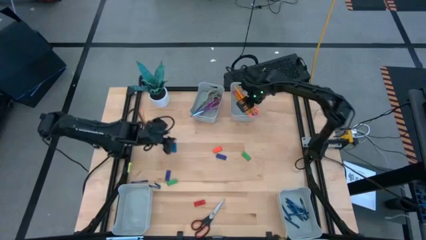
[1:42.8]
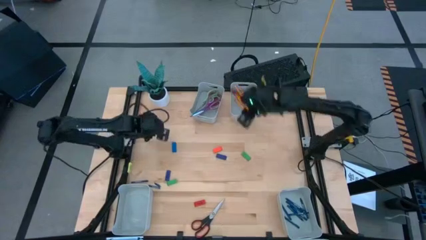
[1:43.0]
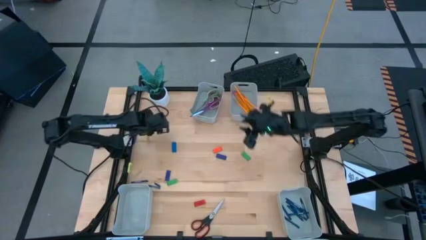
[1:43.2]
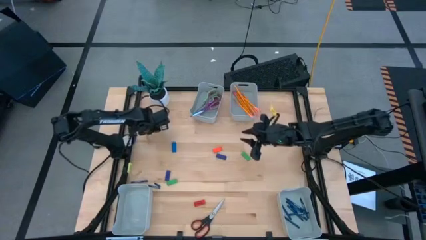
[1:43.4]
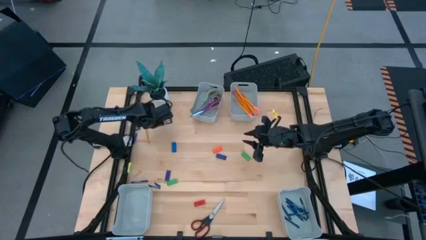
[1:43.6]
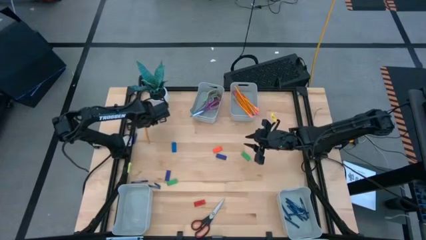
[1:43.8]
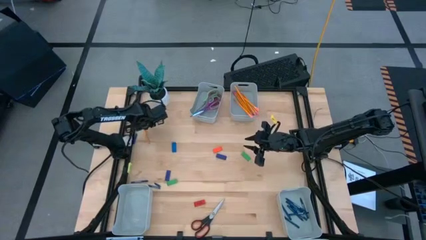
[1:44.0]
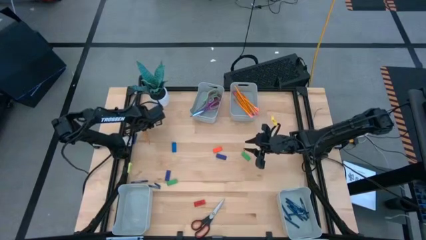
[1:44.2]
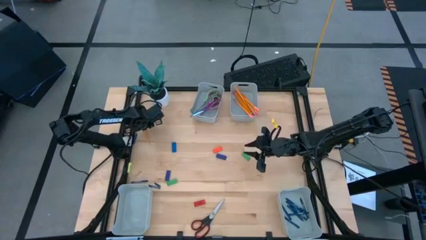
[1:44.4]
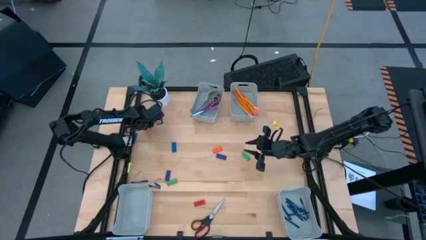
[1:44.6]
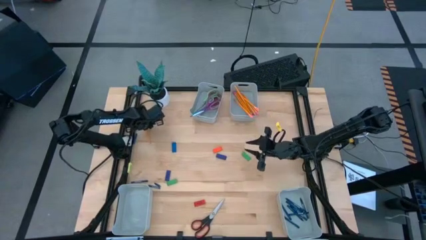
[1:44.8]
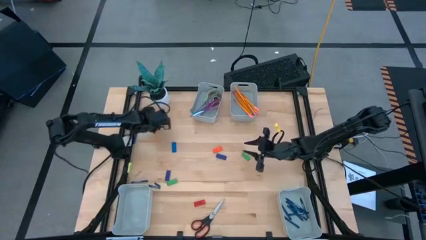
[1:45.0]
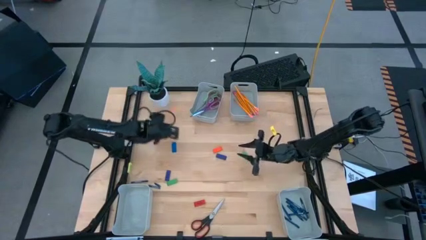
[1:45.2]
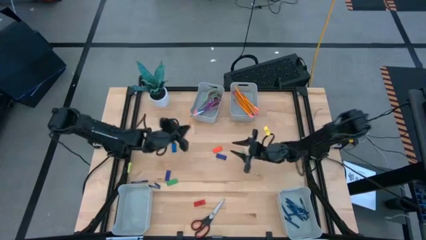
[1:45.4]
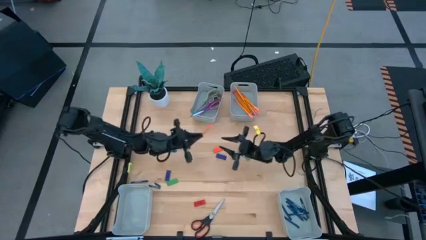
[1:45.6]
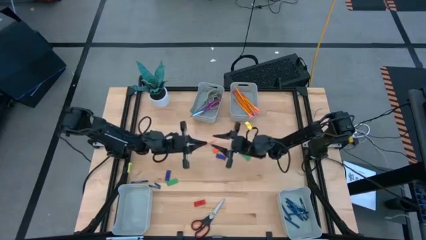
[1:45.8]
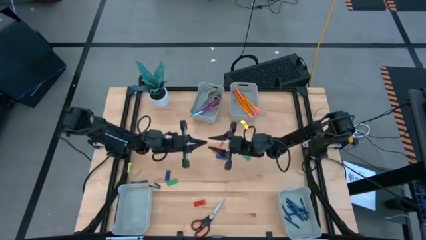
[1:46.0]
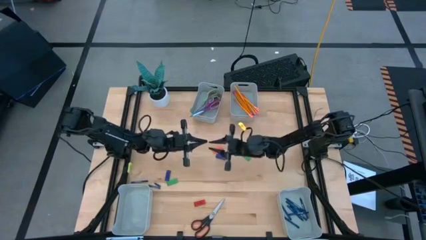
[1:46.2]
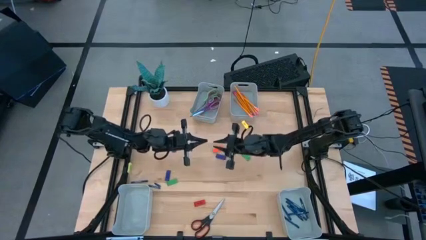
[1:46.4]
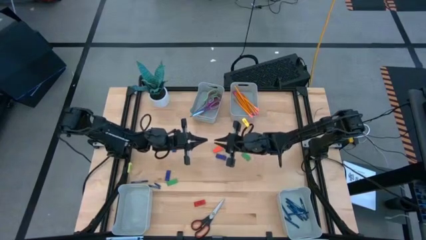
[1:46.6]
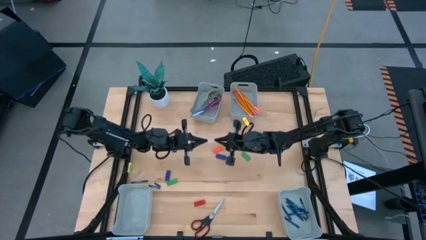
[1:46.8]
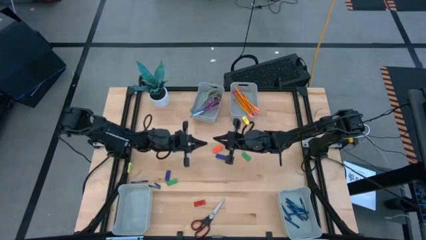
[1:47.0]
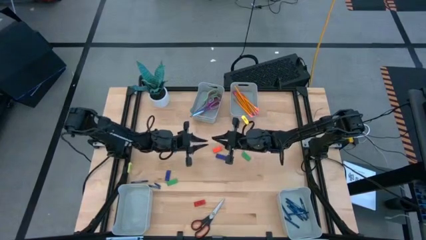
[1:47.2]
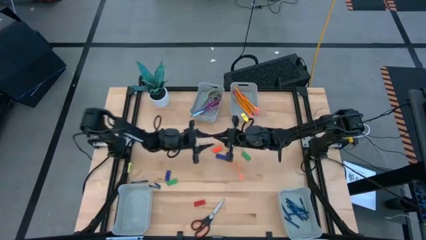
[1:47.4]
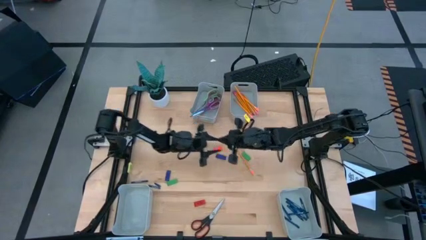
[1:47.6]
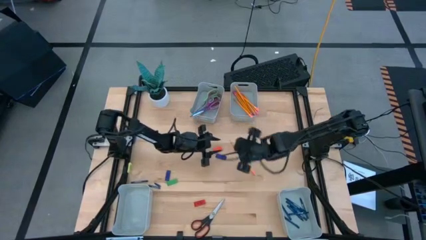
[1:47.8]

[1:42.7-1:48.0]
Task: Sort crayons/erasers/pens/pencils in bins
Put the pencil into the top right bin

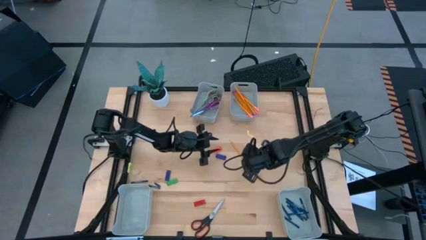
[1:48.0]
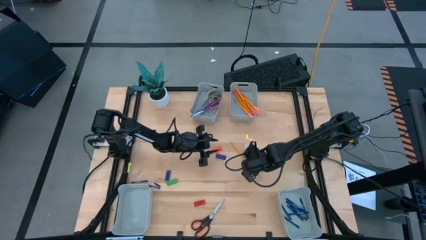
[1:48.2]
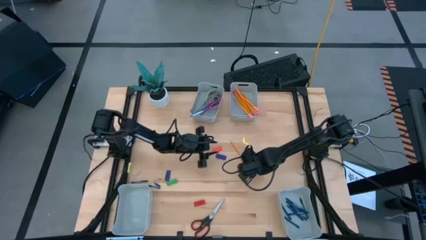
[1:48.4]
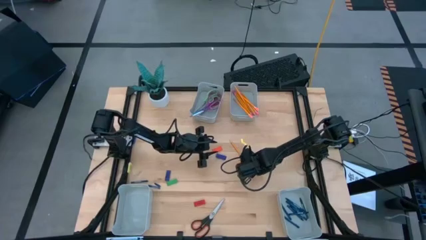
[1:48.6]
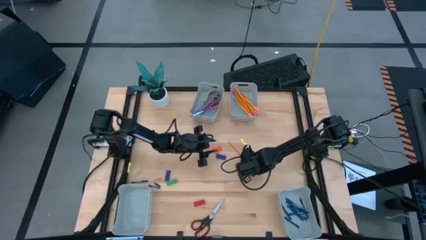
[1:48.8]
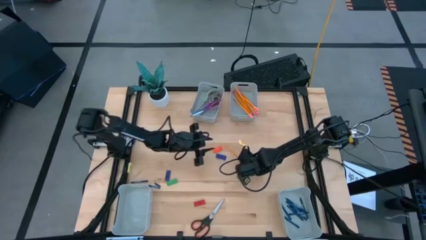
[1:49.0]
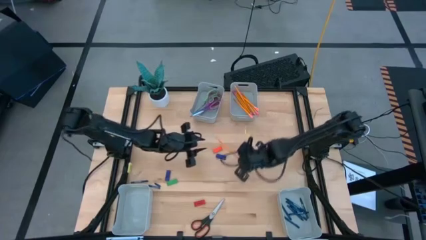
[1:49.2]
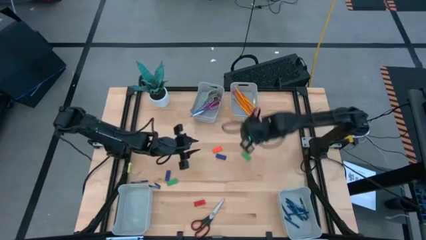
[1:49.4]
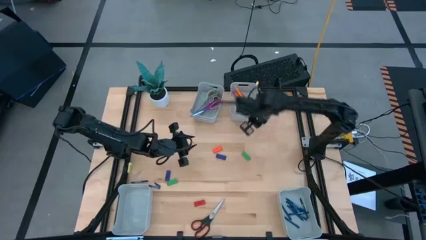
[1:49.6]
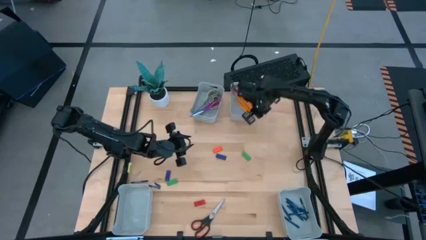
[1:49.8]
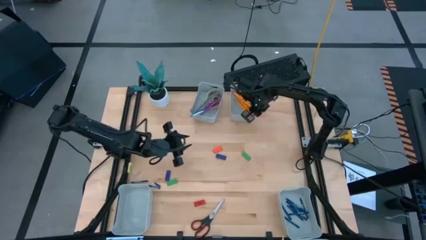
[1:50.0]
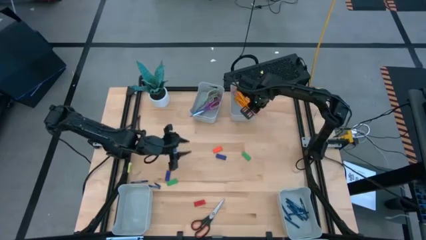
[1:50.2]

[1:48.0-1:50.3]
Put the pencil into the top right bin

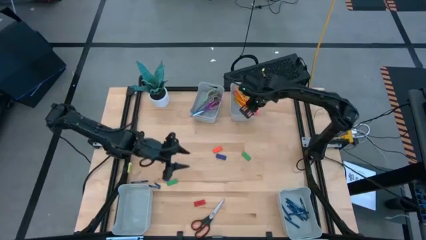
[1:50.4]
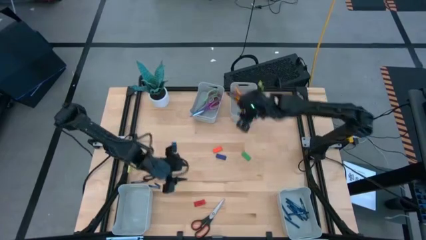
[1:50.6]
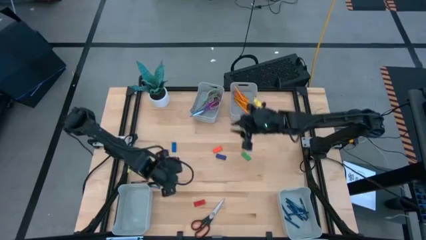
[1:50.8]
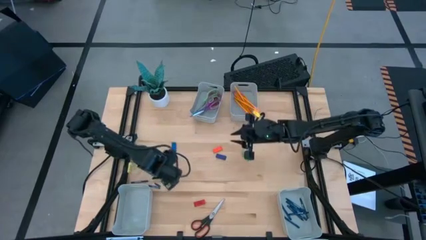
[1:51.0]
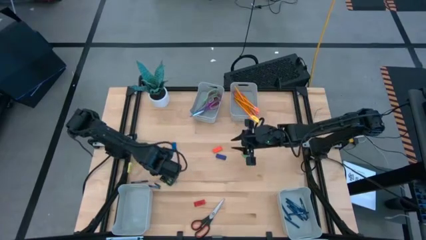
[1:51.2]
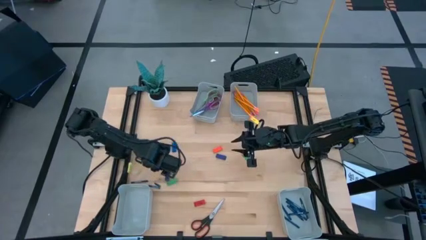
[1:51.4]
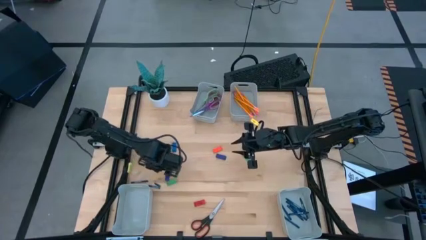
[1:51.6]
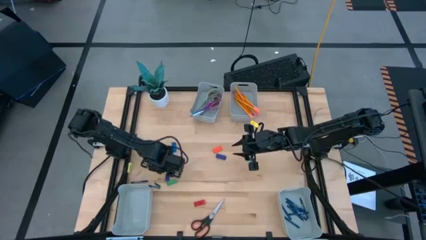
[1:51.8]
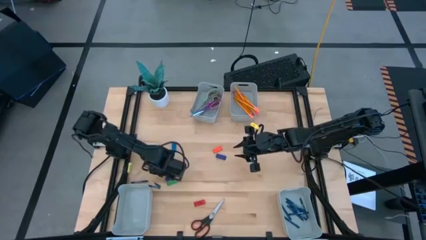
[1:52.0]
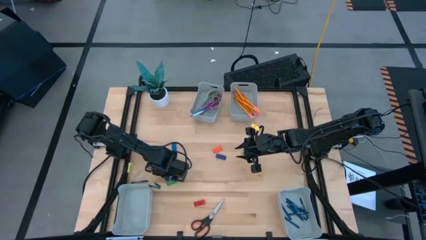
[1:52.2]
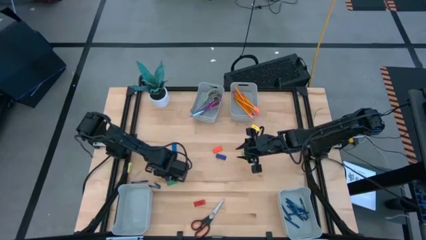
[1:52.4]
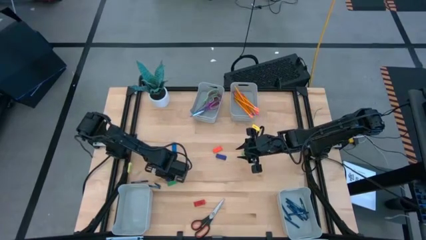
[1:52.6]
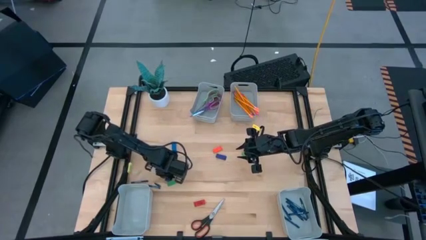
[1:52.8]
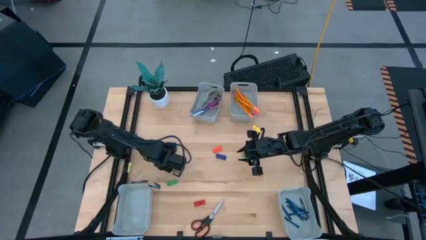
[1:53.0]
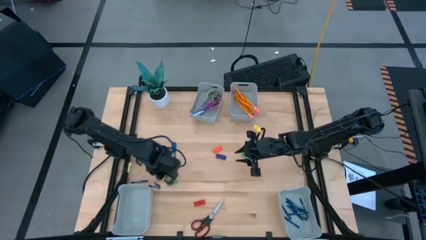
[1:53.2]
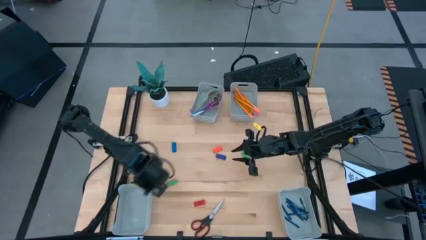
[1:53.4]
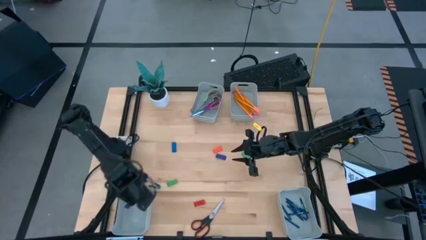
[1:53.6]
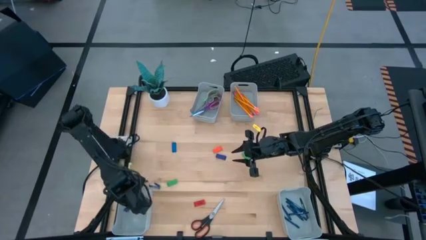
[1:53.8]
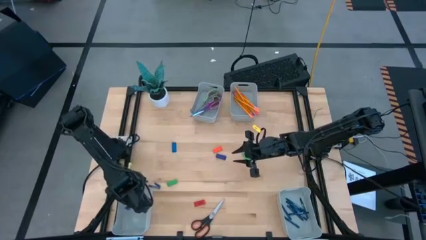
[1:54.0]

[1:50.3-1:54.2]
Put the dark blue eraser into the bottom left bin

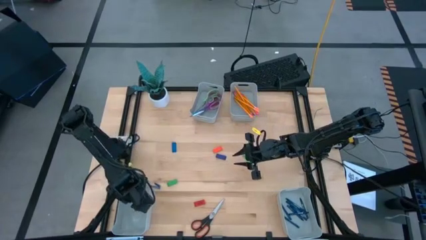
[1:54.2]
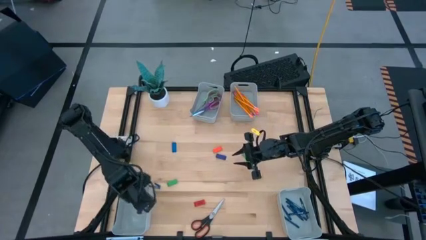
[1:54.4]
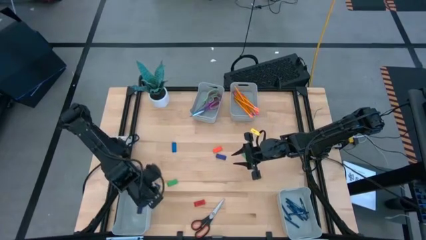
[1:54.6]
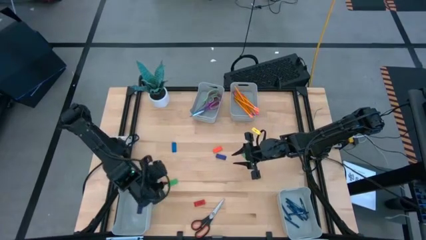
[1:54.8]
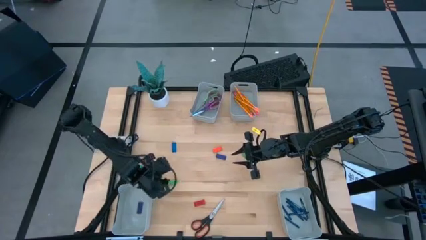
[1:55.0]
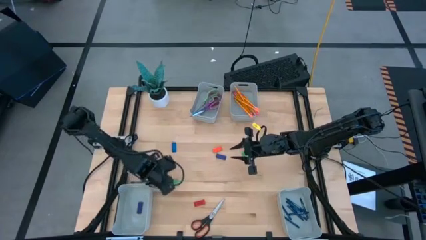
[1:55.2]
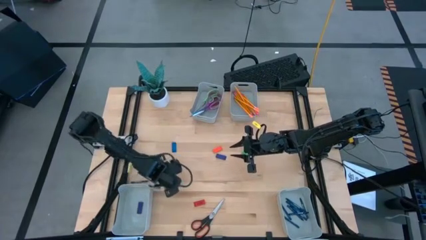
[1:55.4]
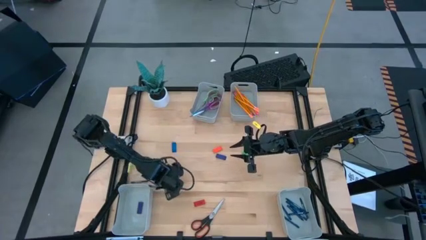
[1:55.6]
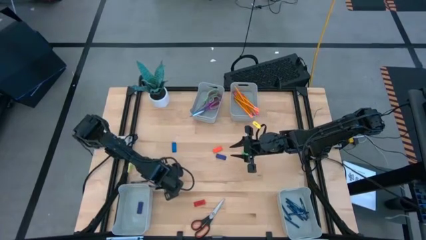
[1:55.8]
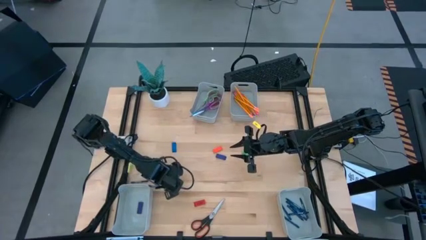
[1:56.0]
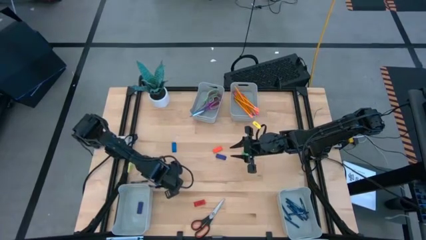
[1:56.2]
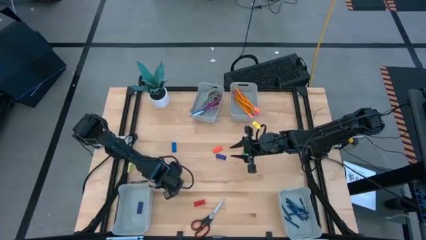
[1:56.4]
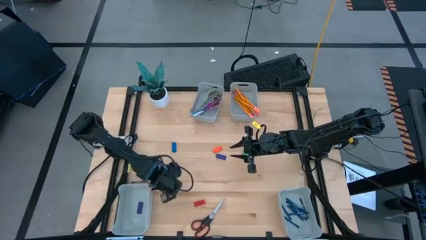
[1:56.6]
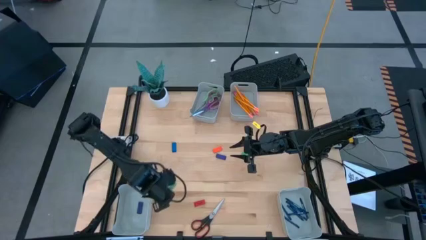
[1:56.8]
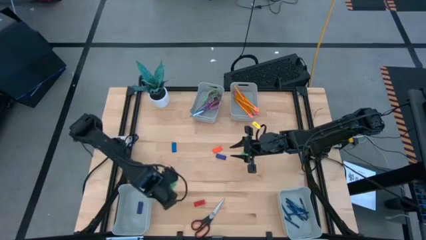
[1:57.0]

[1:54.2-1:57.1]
Put the green eraser into the bottom left bin

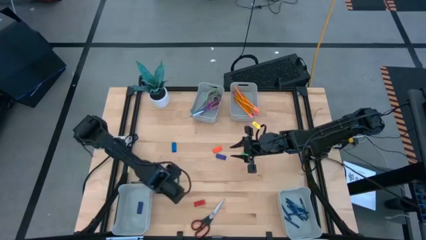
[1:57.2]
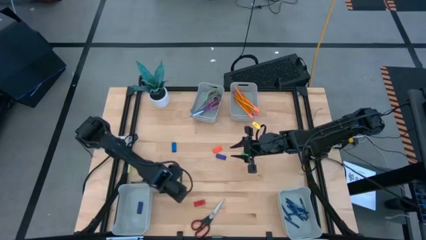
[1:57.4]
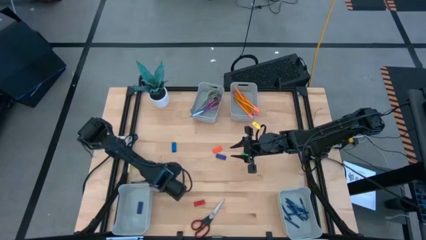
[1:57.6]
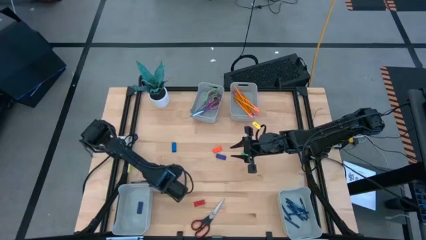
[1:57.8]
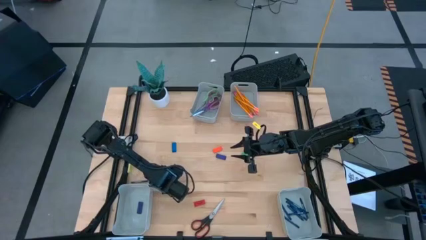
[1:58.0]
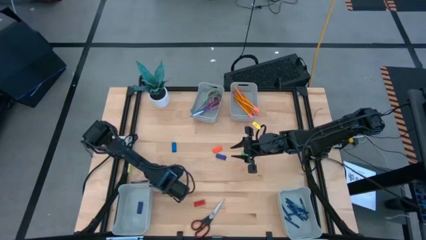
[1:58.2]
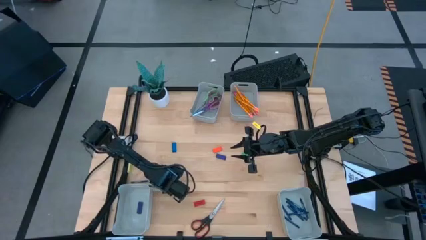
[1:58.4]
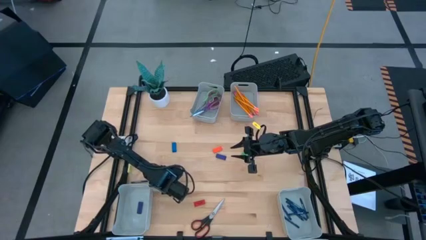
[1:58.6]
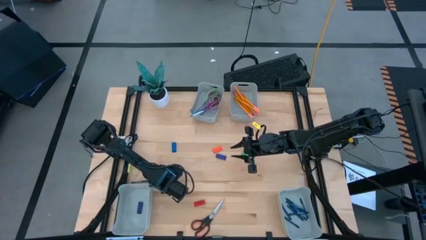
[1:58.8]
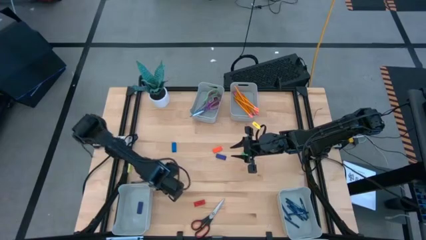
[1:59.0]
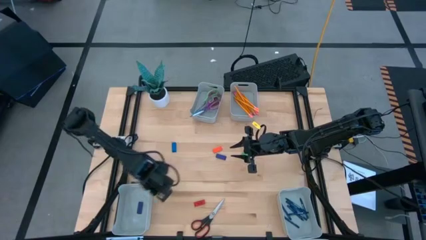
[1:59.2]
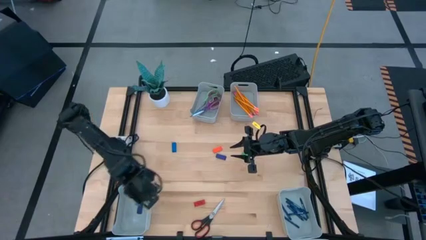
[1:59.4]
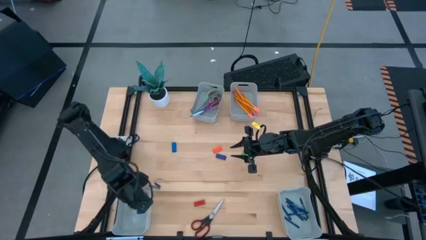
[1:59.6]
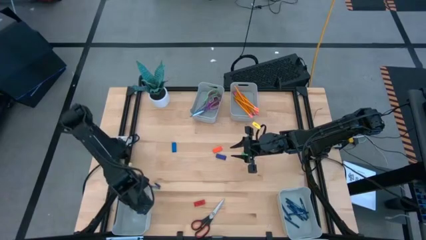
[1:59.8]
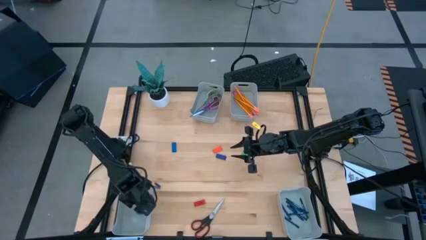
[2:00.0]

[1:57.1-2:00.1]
Put the green eraser into the bottom left bin
